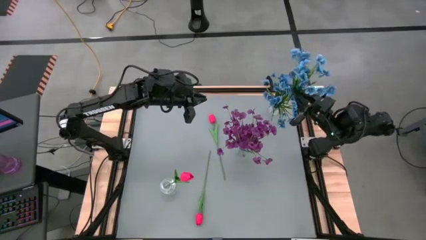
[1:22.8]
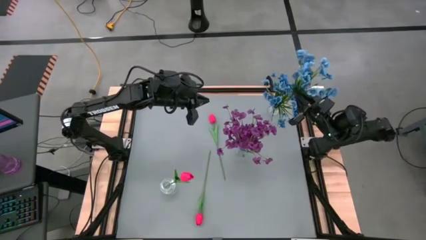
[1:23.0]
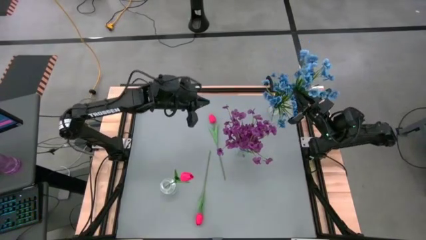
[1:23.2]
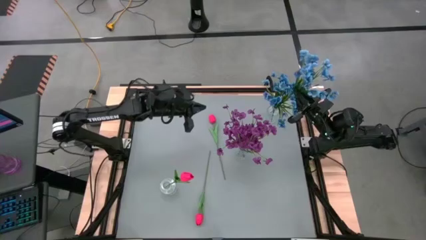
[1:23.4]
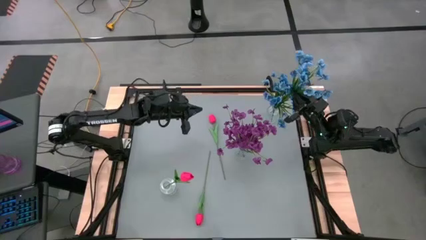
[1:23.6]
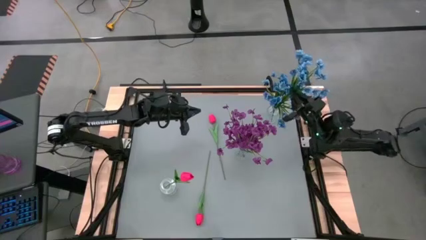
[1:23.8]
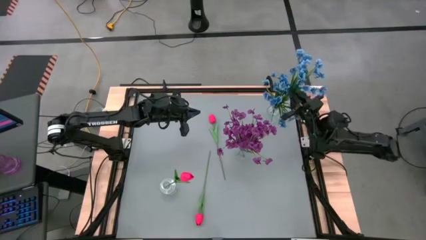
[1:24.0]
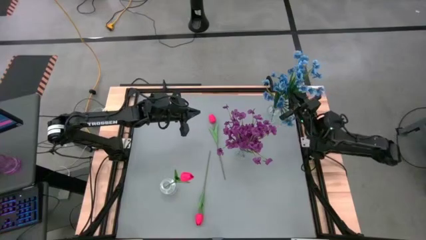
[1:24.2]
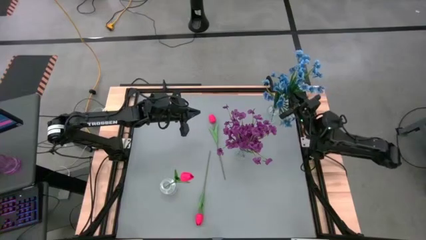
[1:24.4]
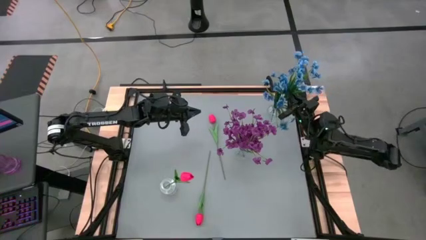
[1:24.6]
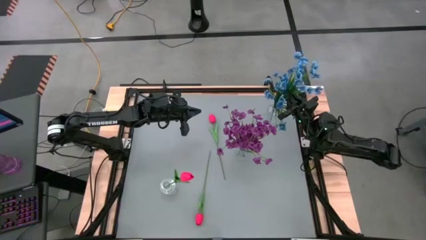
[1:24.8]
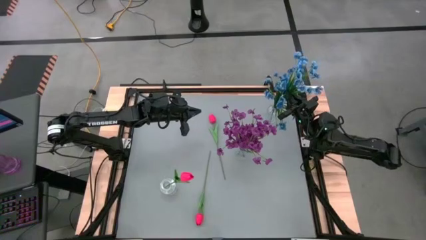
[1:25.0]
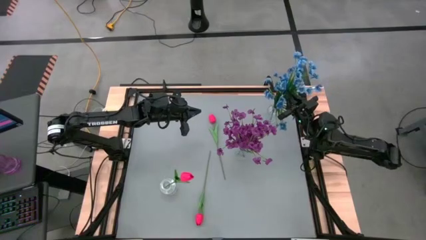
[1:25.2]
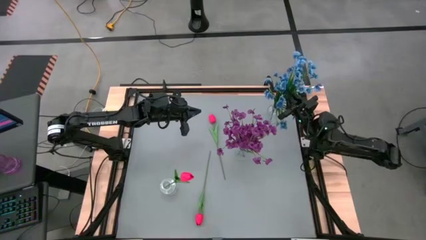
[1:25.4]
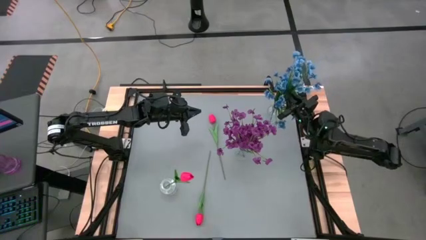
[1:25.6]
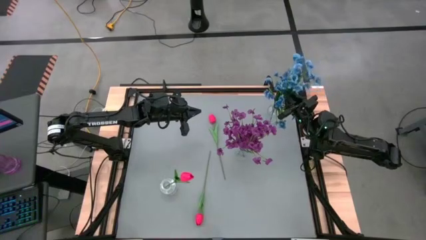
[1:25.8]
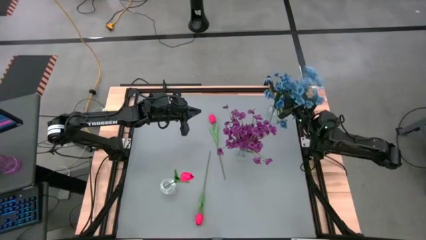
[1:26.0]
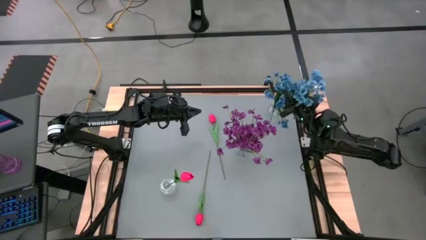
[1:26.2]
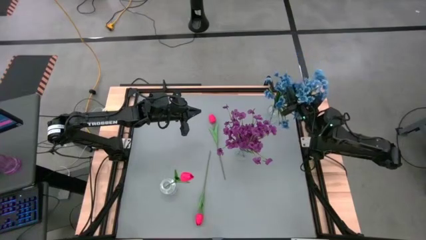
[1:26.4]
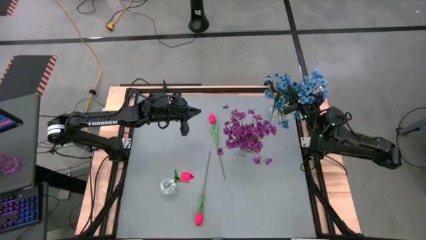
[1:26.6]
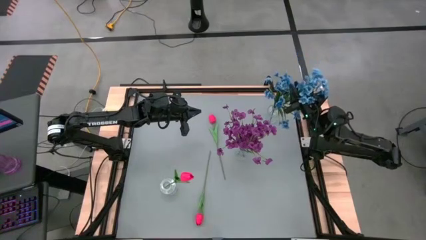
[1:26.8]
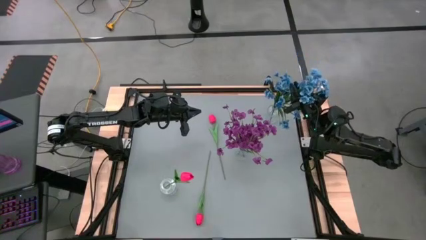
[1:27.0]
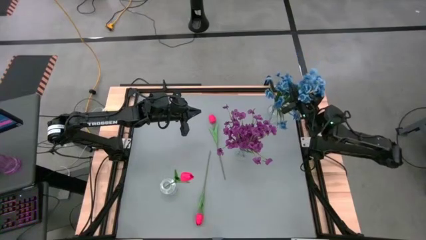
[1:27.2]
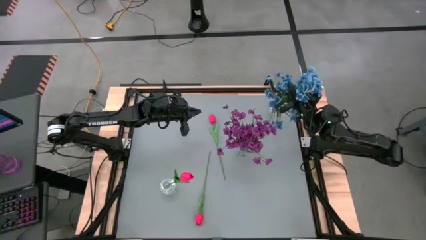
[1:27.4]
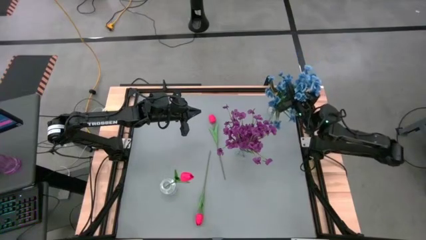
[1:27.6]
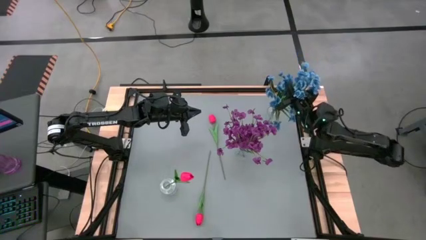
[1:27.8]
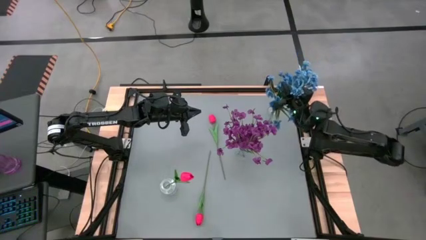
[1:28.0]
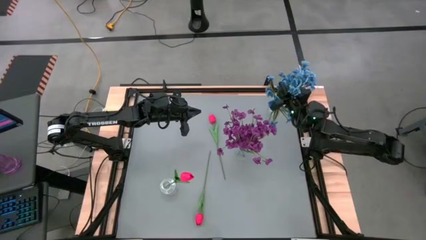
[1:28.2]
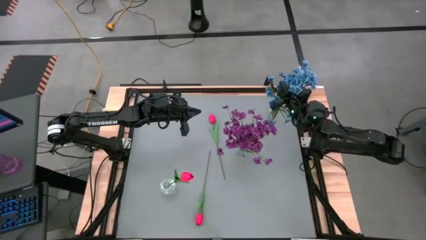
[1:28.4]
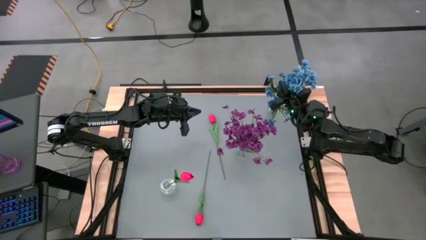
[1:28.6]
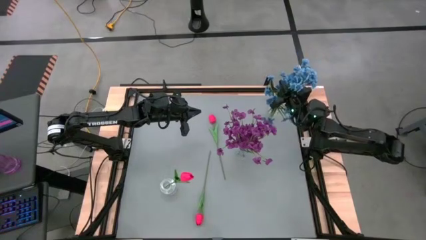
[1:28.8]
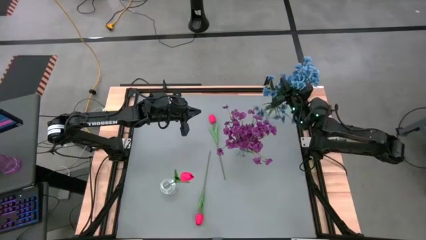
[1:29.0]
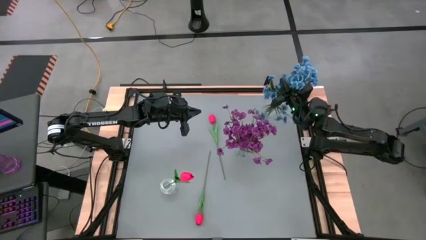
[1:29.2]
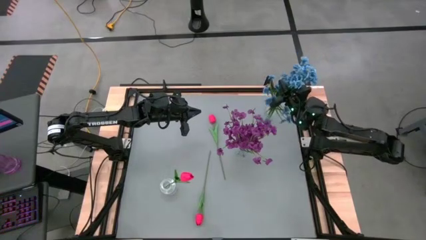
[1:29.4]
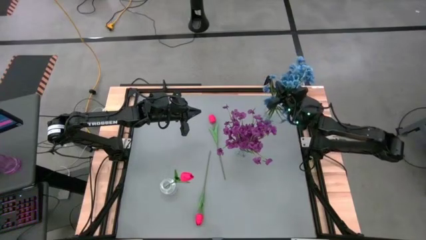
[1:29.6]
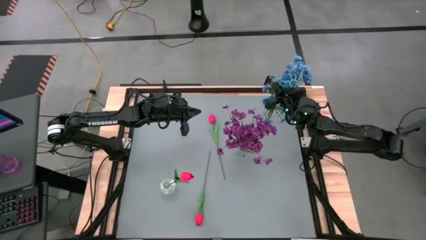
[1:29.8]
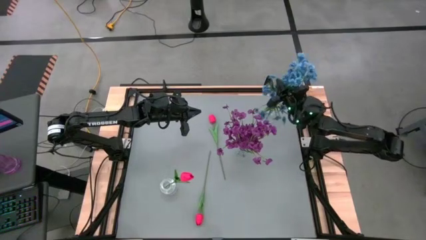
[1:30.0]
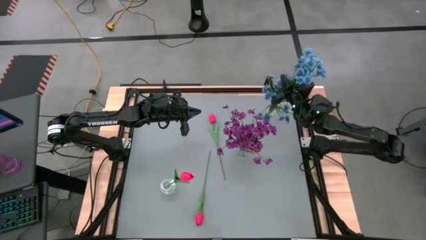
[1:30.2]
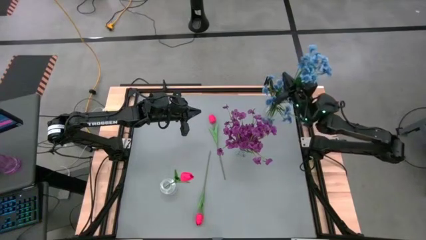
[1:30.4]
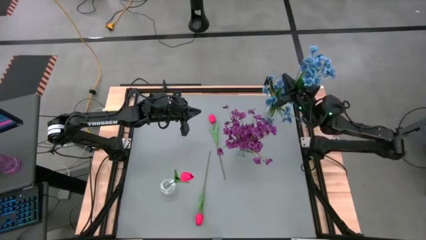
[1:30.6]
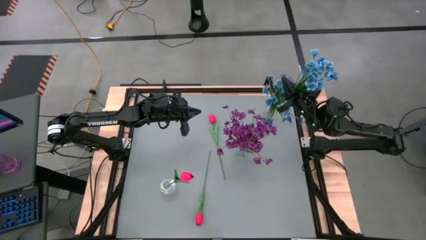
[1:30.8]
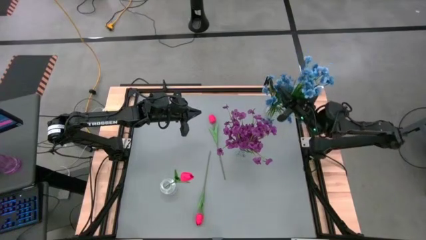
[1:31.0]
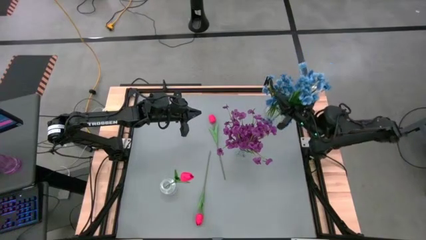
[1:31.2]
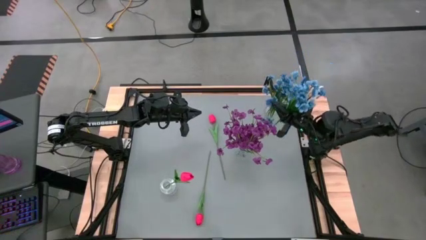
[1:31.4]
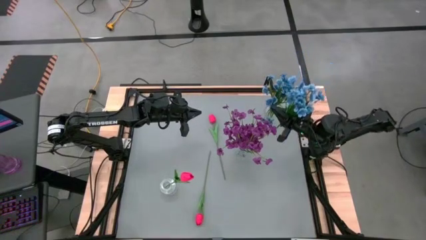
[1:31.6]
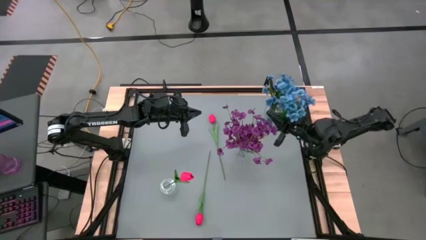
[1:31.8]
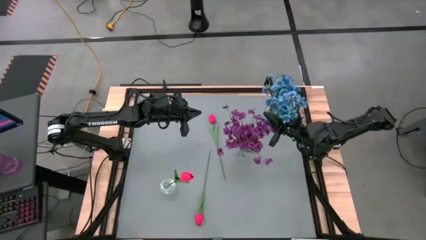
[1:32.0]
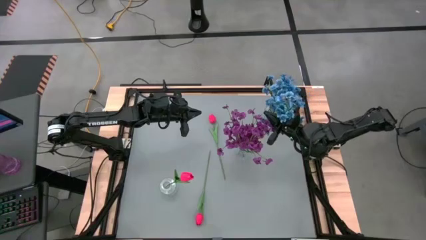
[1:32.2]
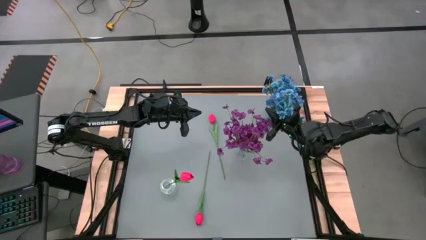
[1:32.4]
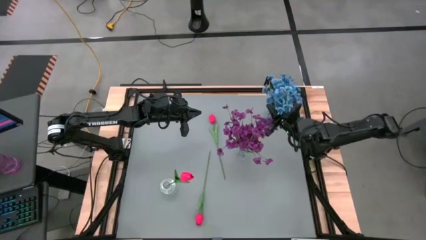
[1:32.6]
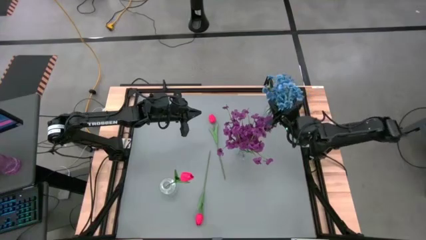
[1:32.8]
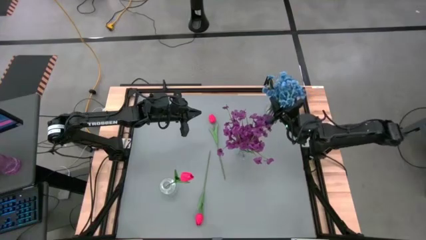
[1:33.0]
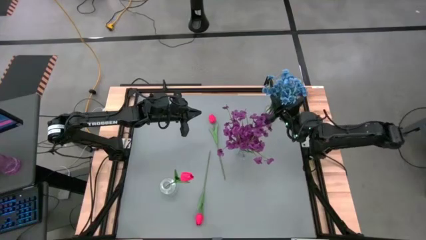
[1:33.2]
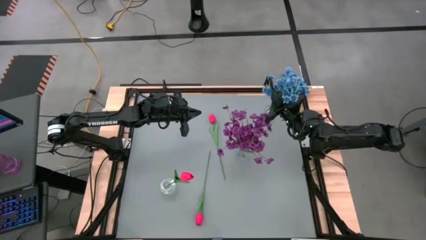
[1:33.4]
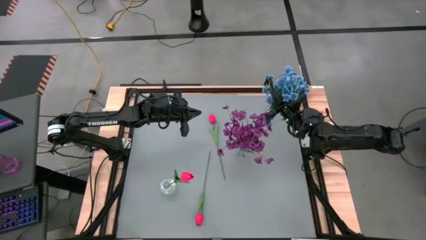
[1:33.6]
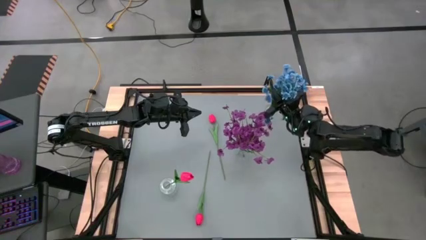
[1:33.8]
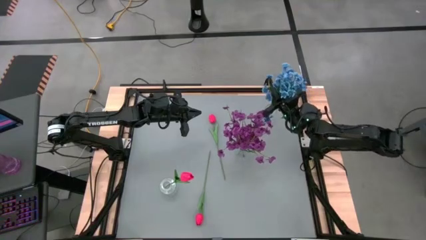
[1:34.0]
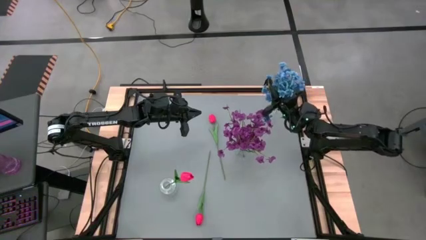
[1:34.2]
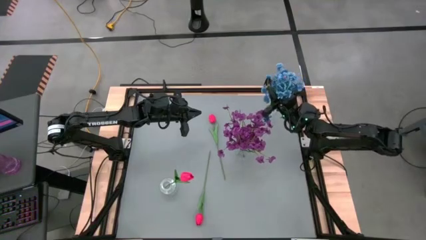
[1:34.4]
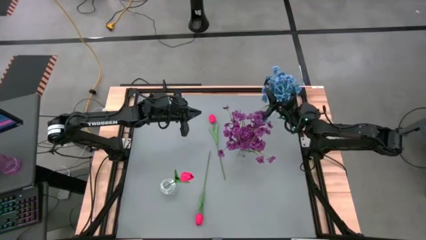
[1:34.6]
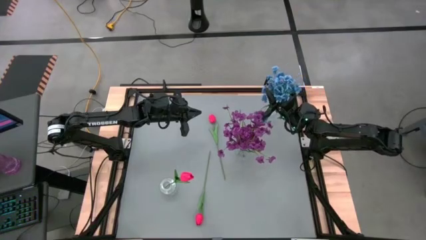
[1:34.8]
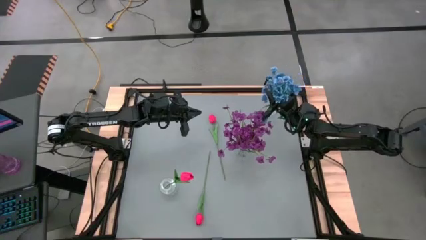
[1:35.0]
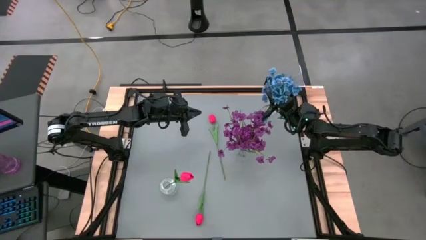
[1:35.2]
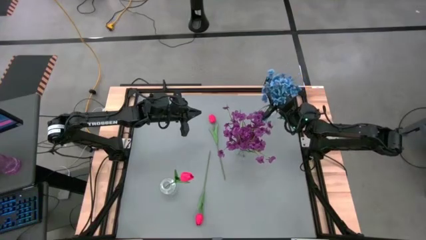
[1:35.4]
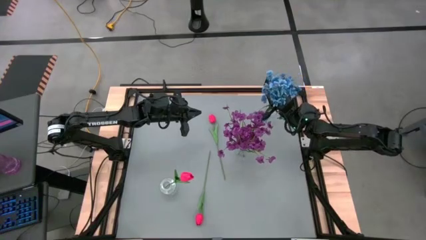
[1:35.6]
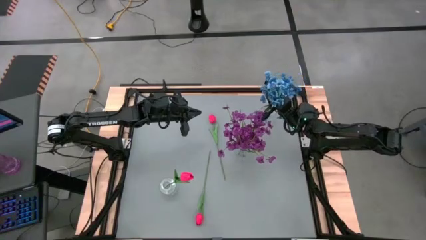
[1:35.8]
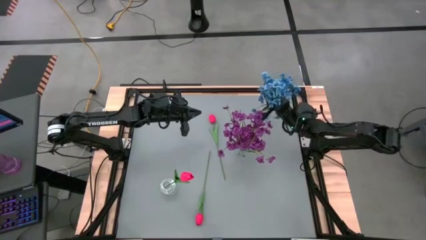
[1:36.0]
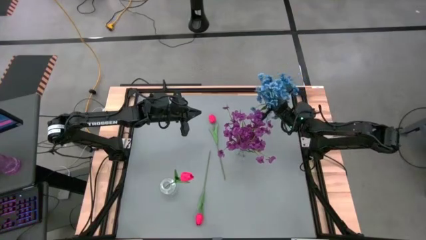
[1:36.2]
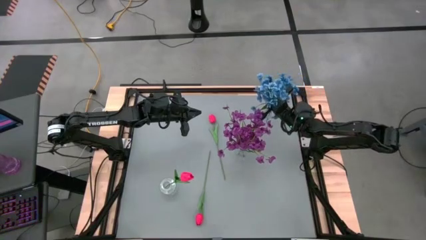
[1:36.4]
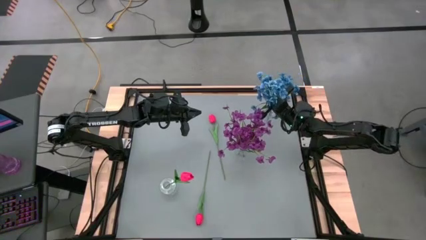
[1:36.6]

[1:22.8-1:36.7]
Task: Sort flowers into vase by color
Put the blue flowers into the top transparent vase
